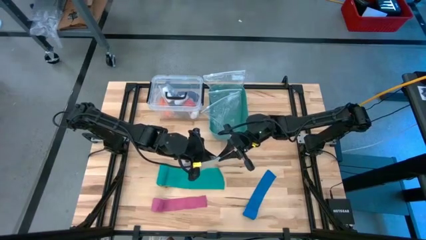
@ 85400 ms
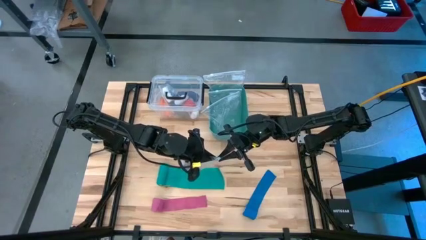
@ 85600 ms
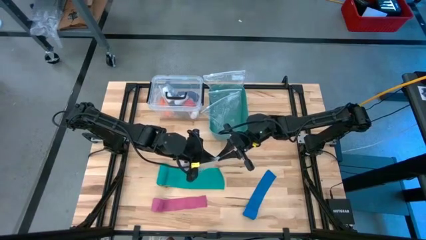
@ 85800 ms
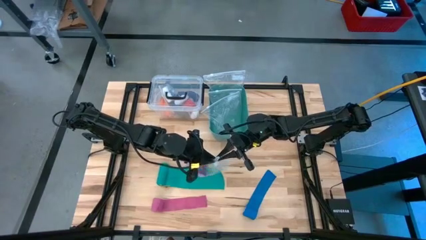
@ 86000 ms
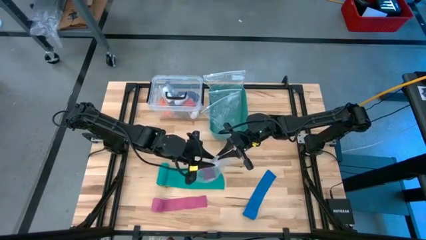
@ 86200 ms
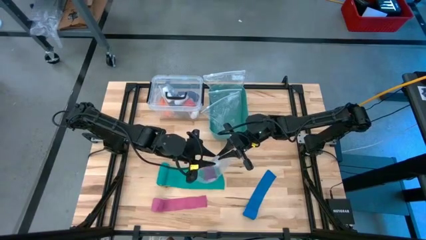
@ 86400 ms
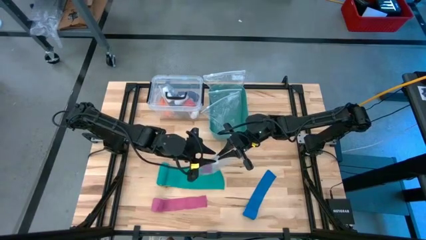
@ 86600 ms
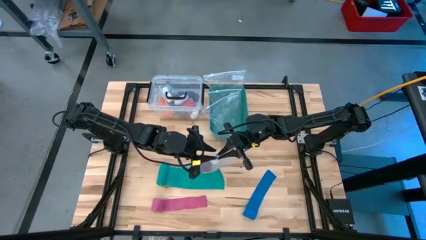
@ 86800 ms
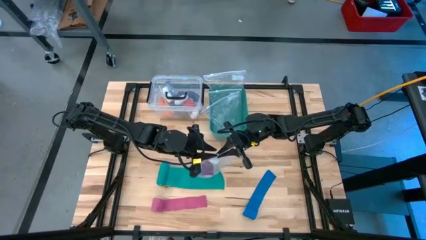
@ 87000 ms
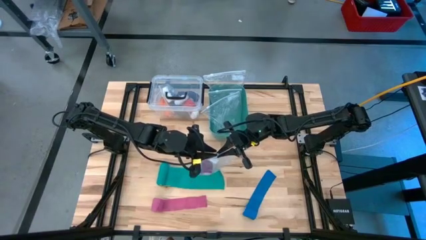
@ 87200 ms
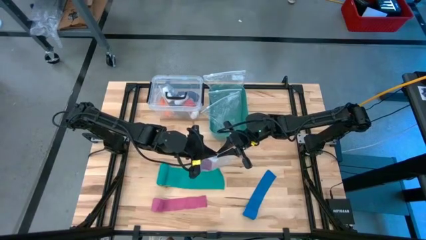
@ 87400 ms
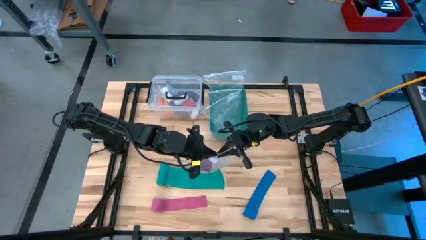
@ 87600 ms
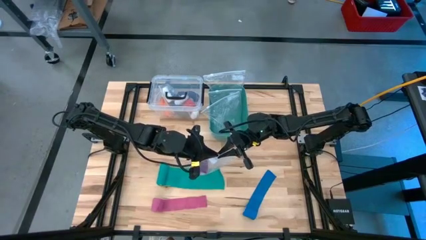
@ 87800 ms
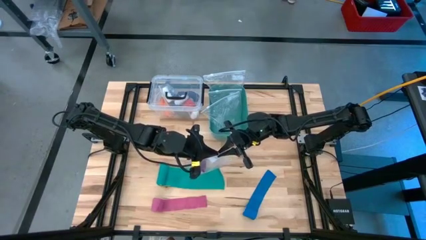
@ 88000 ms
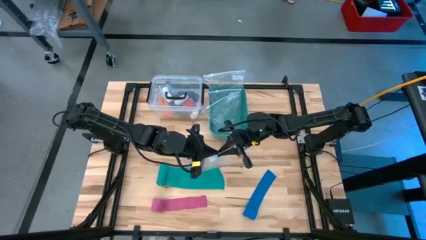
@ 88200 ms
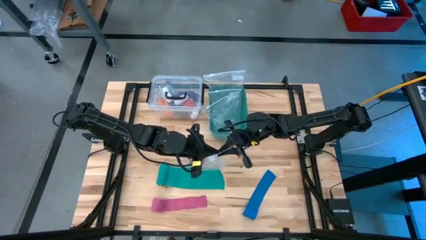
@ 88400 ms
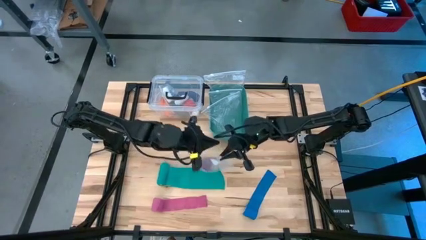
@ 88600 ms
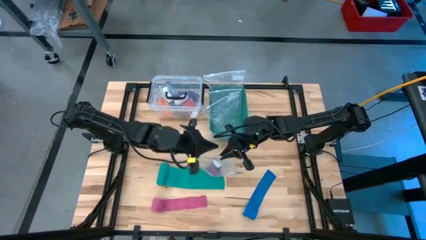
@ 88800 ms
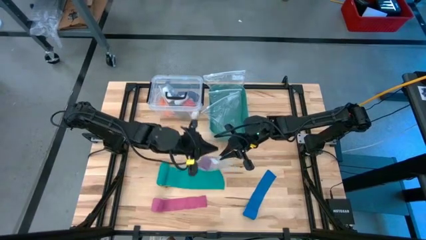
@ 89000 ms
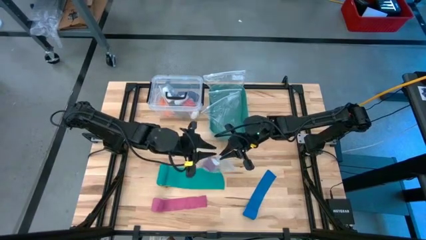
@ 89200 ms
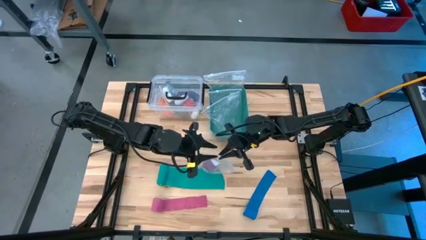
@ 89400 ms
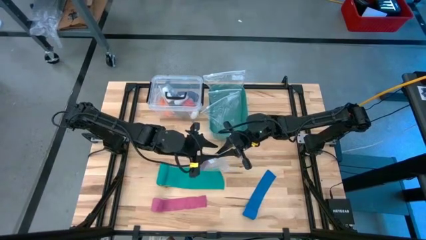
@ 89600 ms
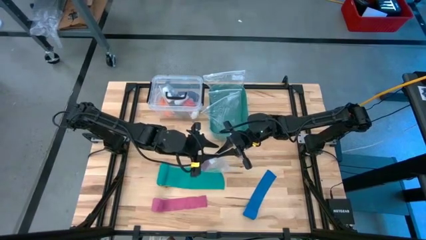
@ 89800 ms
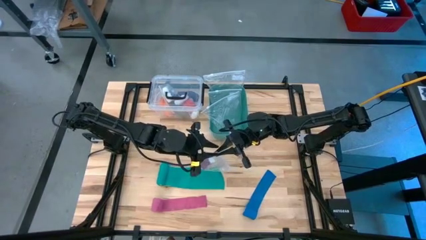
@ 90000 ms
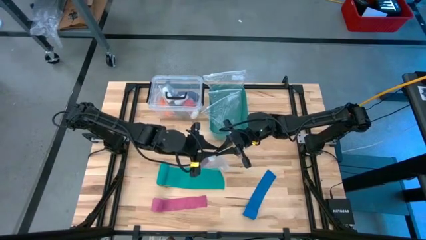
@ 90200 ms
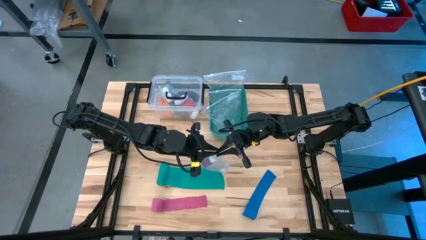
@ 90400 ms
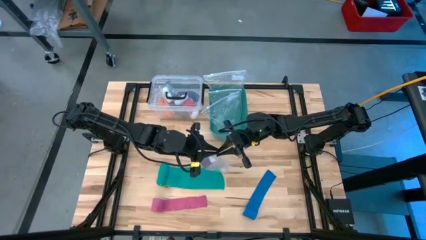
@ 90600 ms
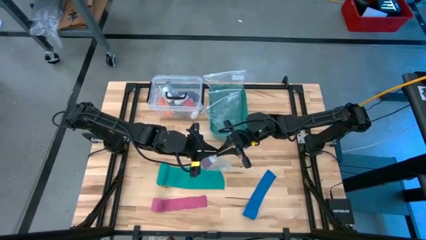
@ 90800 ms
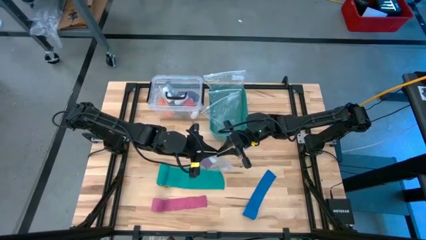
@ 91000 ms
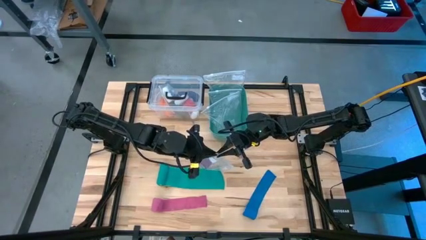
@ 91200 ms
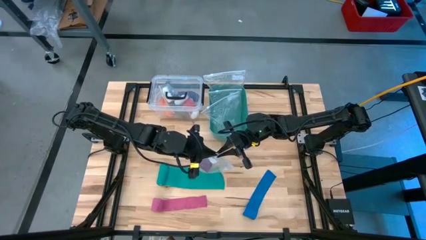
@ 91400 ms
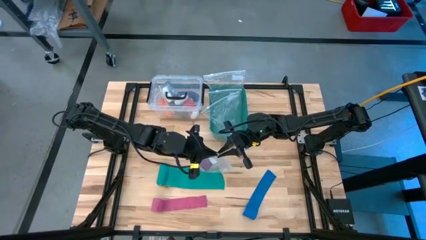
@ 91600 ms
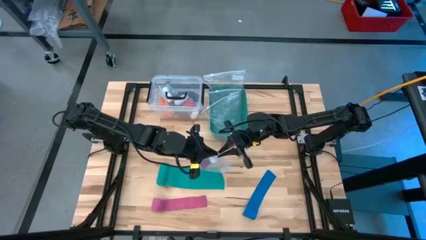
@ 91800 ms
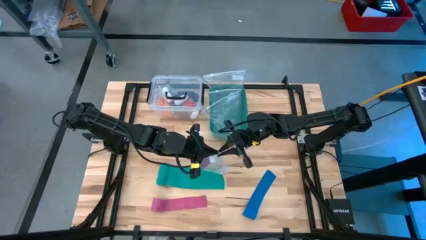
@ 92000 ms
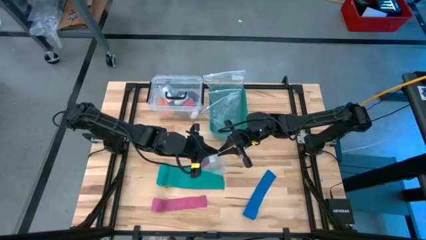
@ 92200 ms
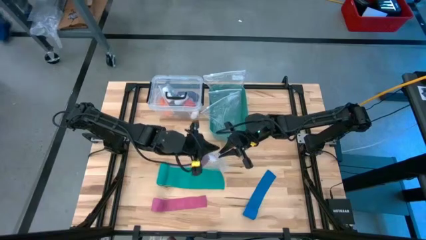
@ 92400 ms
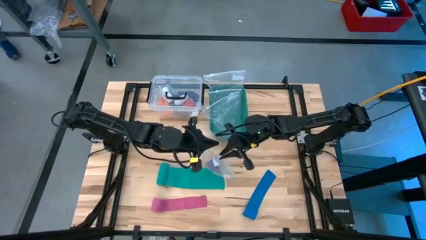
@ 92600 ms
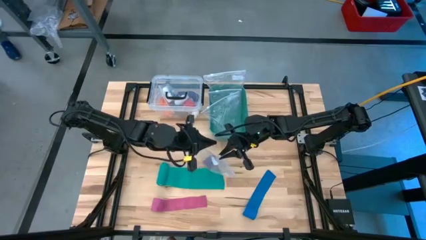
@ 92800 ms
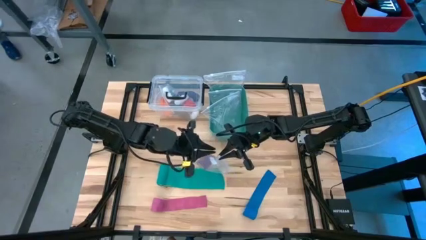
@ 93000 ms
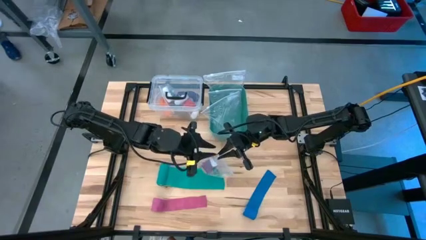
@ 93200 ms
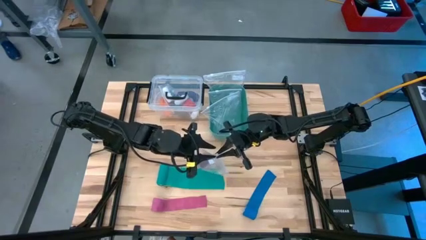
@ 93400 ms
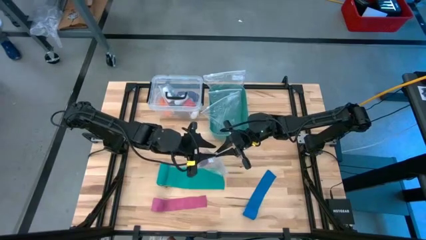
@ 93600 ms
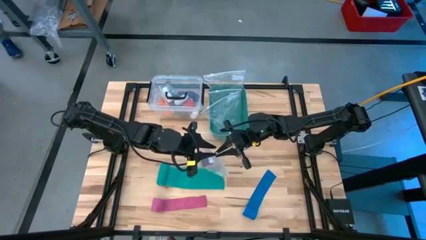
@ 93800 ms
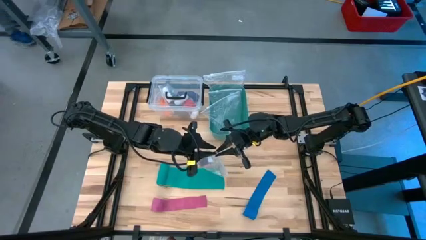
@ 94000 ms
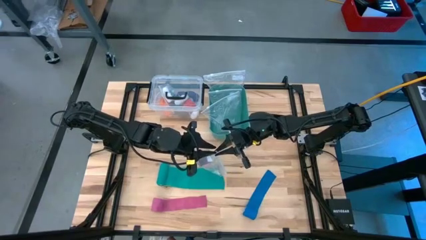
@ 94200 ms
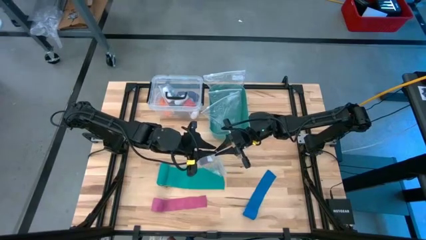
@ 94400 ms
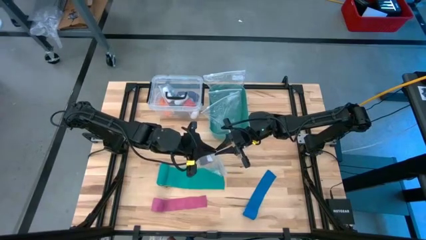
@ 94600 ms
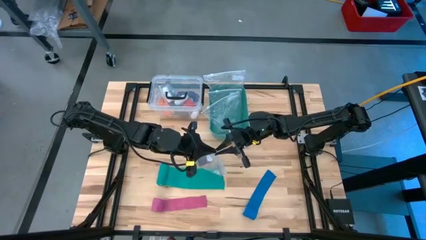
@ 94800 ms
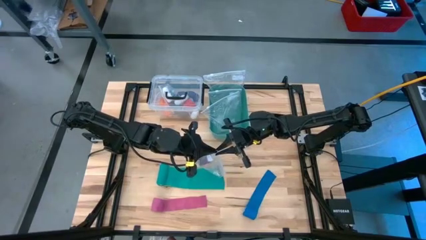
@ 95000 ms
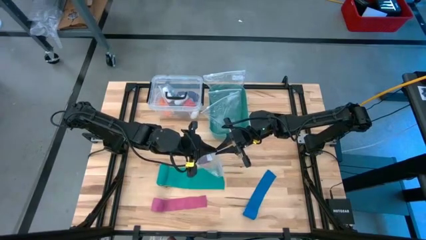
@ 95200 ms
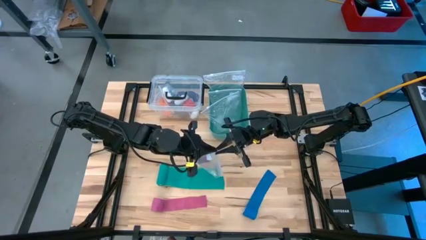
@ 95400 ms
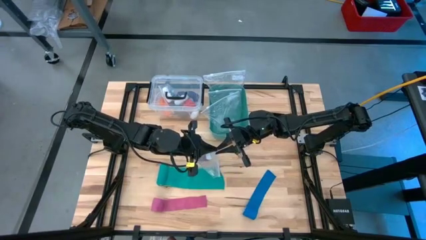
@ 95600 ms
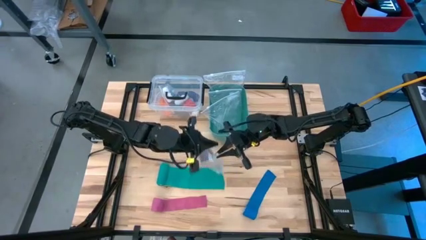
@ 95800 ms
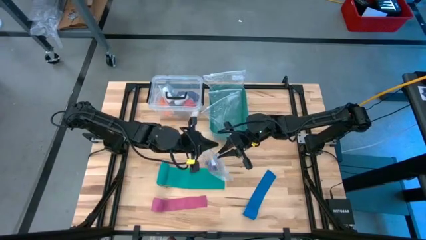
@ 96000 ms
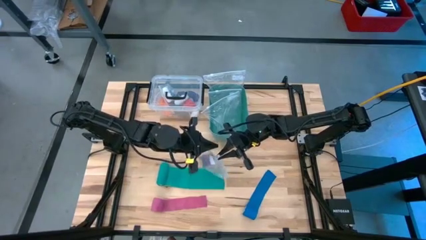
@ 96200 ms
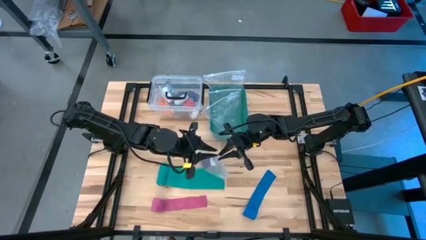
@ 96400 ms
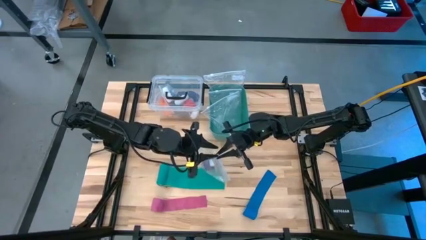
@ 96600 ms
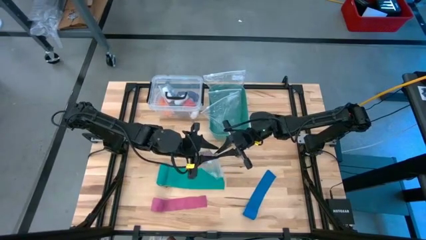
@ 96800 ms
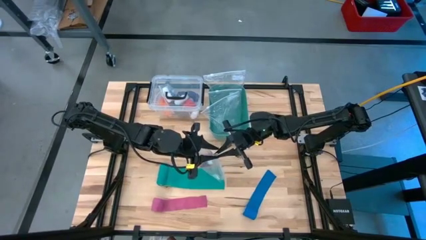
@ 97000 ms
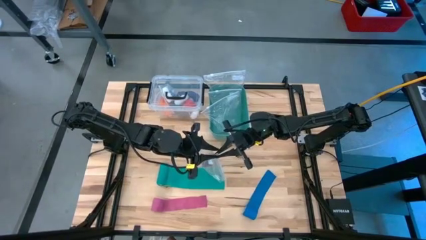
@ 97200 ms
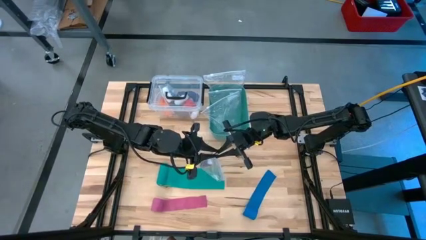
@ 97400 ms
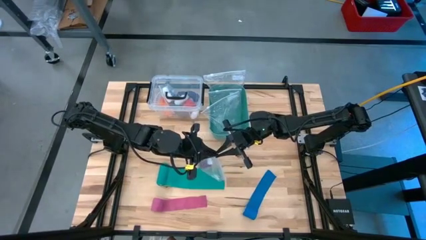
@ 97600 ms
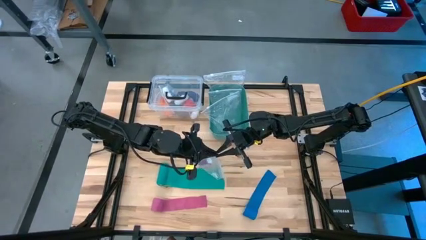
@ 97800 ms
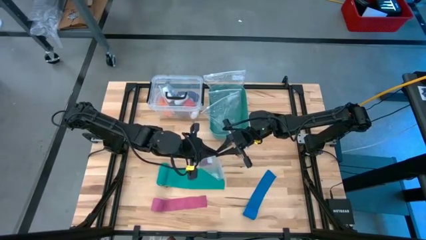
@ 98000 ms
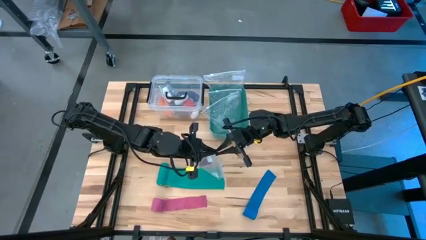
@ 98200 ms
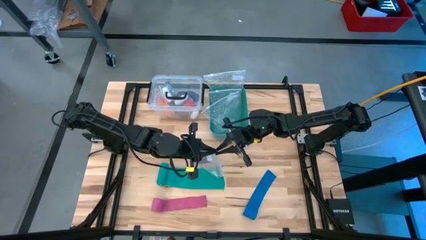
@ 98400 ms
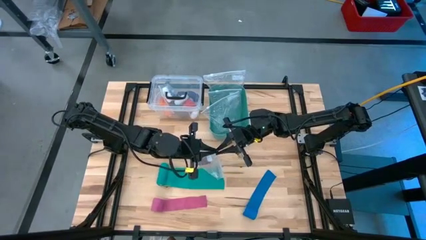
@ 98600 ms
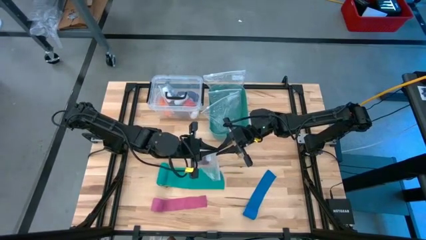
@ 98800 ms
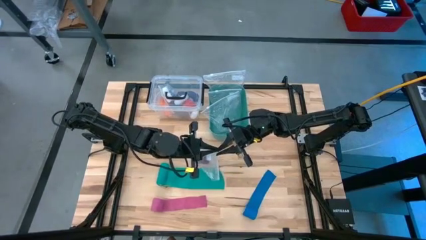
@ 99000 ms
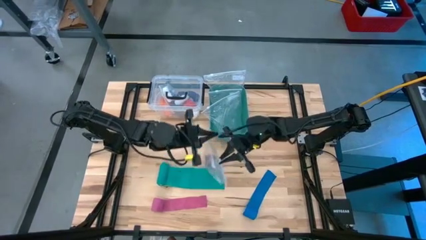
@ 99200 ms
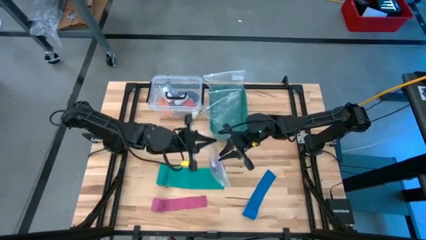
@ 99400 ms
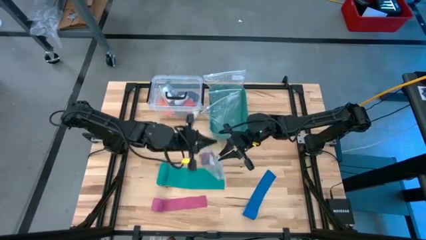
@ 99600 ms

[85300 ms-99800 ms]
Task: Roll bandage
Close the transparent zip bag

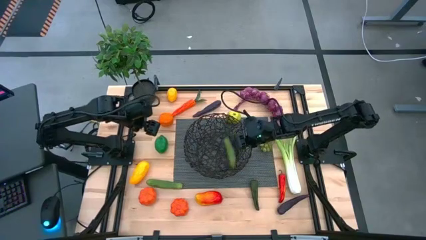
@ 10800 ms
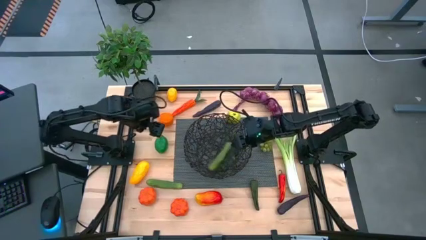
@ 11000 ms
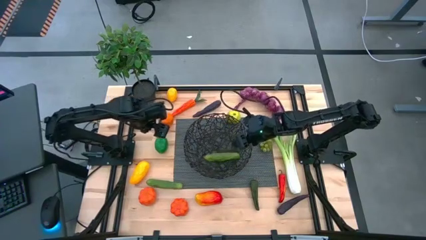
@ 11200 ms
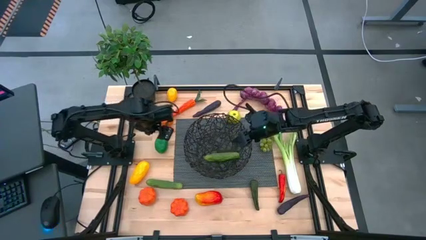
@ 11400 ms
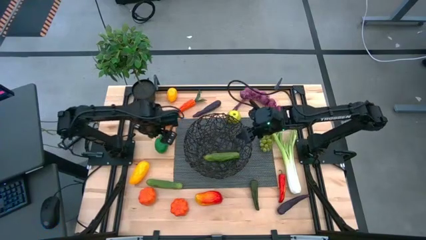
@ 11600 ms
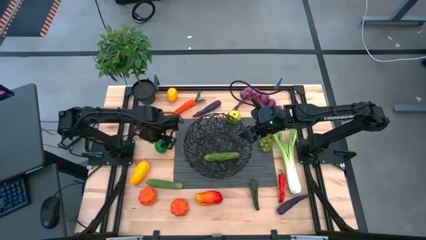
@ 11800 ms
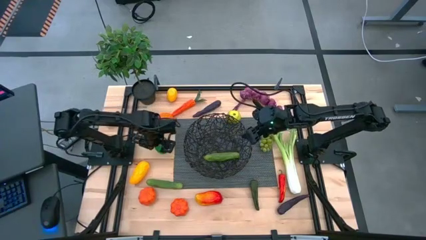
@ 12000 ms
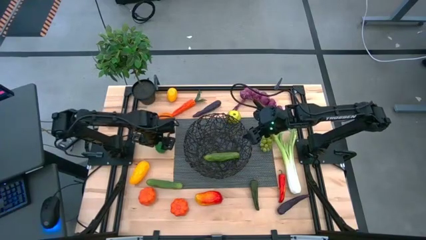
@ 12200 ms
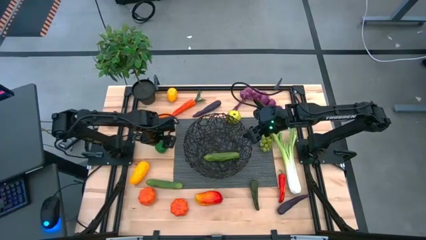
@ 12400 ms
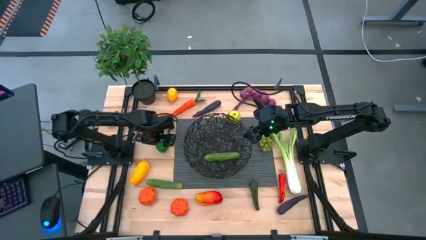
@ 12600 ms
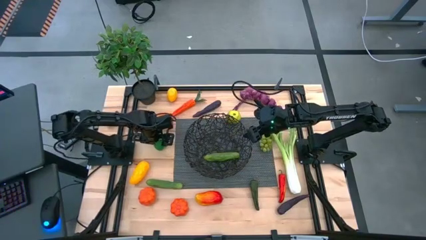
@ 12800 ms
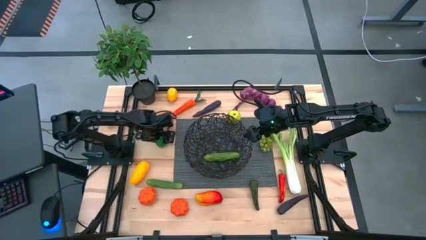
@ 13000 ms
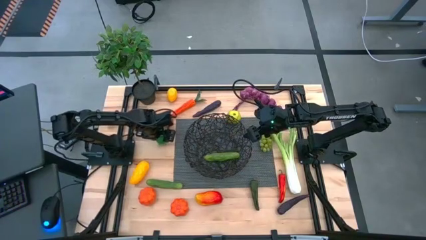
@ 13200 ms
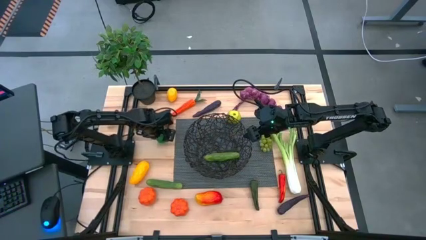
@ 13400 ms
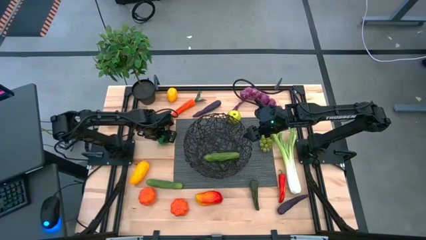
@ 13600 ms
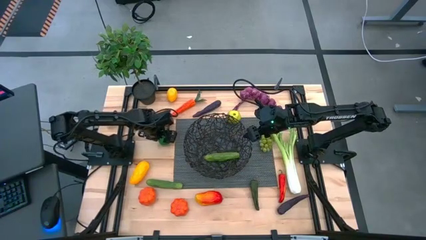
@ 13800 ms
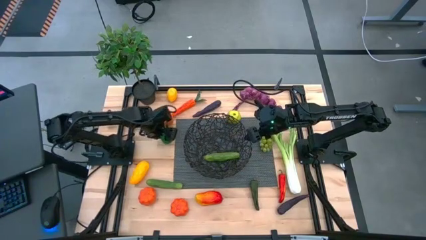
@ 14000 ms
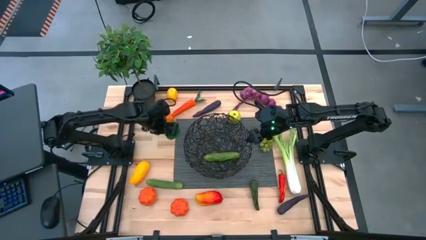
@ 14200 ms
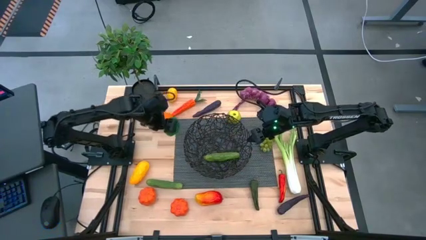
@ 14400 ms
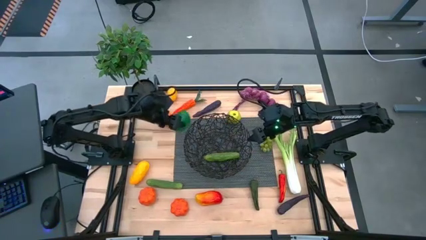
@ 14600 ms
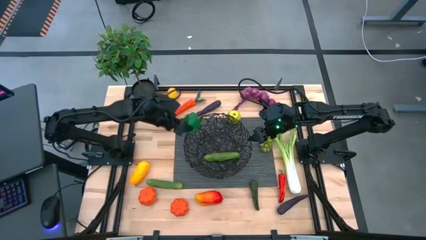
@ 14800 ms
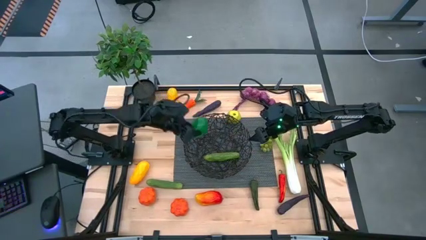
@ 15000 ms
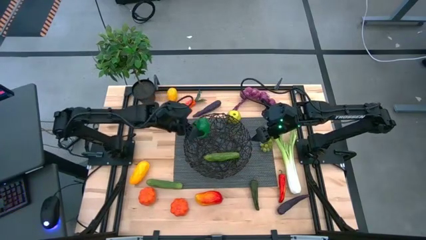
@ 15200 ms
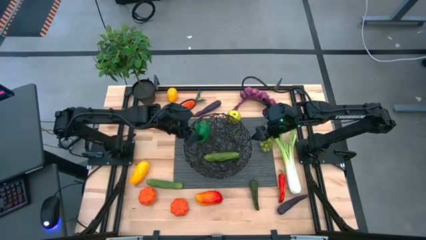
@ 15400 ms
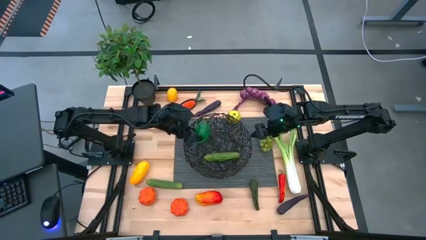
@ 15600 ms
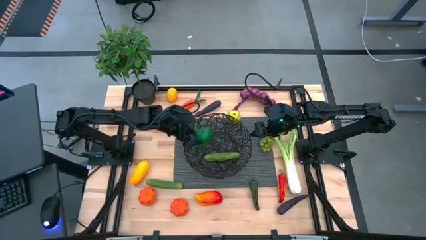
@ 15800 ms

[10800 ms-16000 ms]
Task: Build produce basket
Put the lime into the black basket
